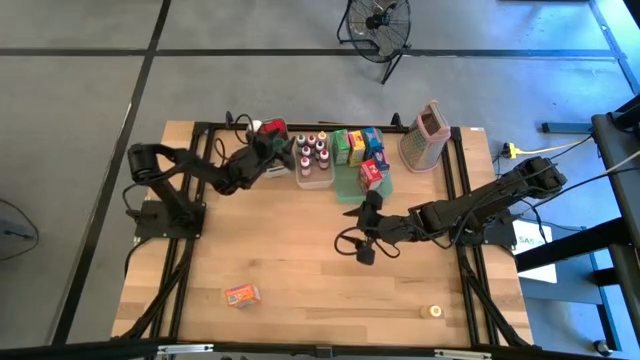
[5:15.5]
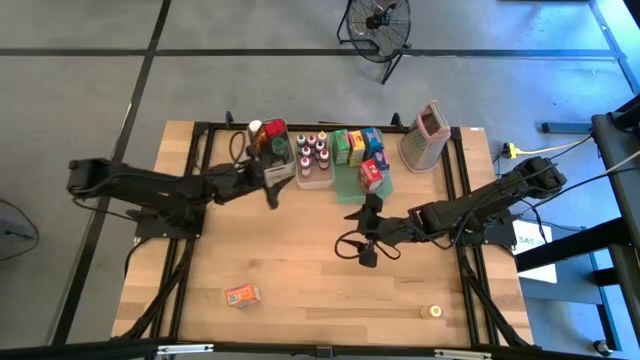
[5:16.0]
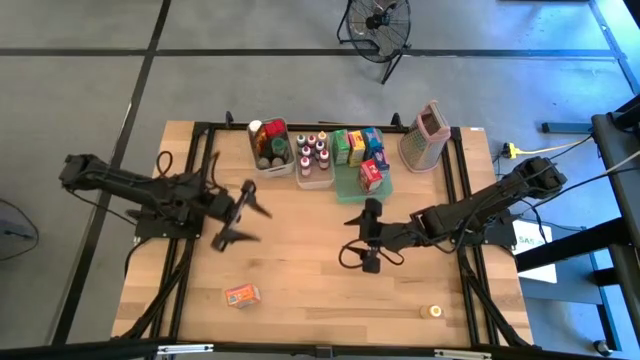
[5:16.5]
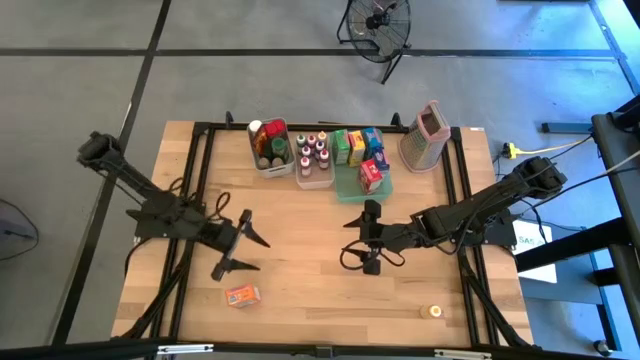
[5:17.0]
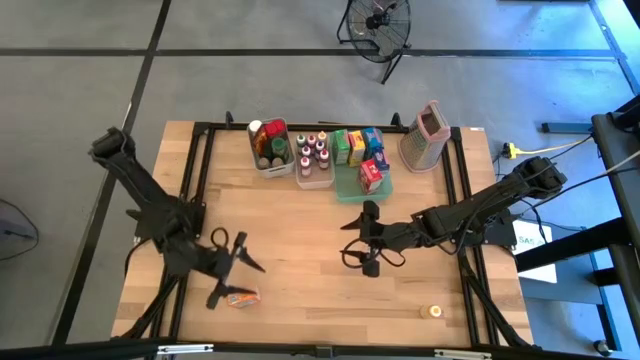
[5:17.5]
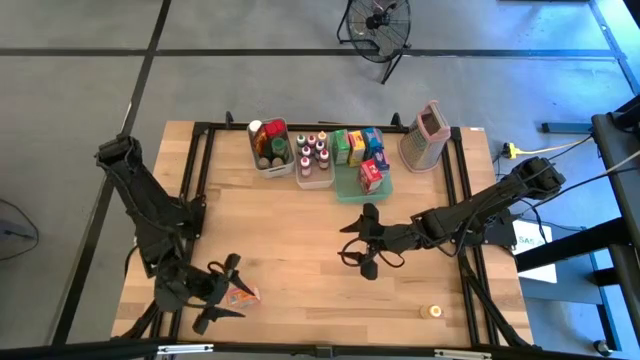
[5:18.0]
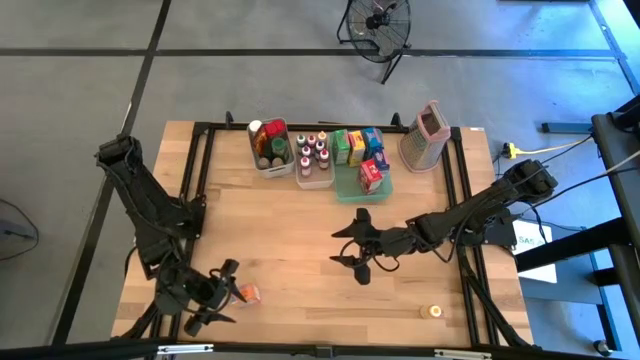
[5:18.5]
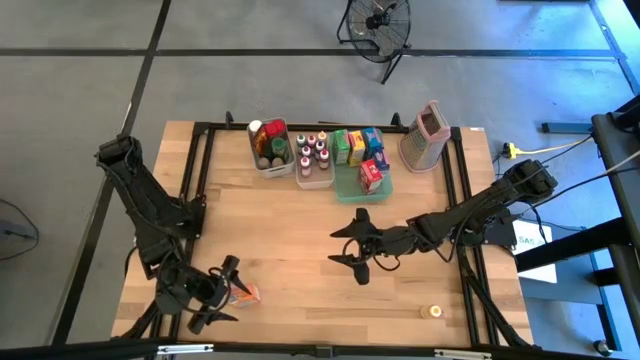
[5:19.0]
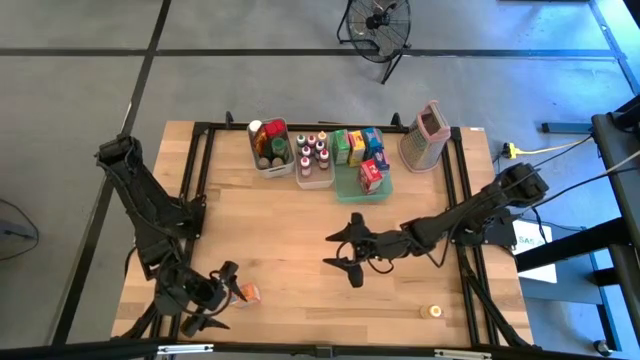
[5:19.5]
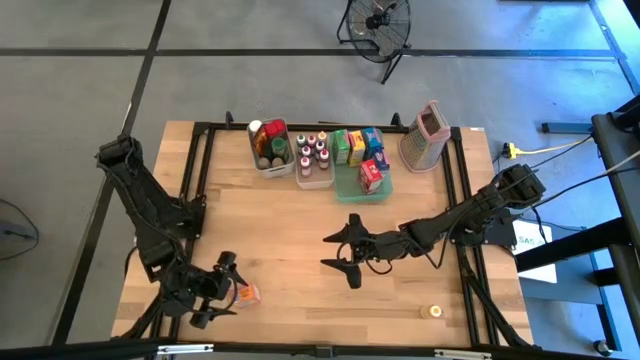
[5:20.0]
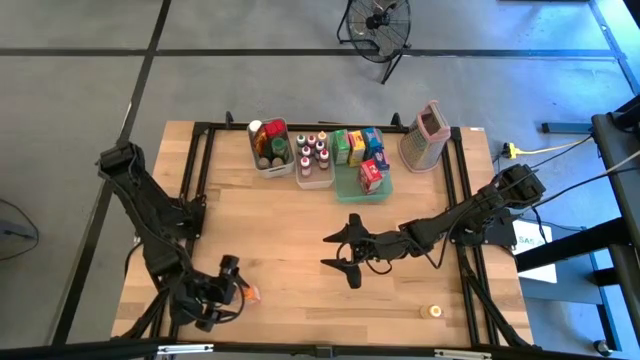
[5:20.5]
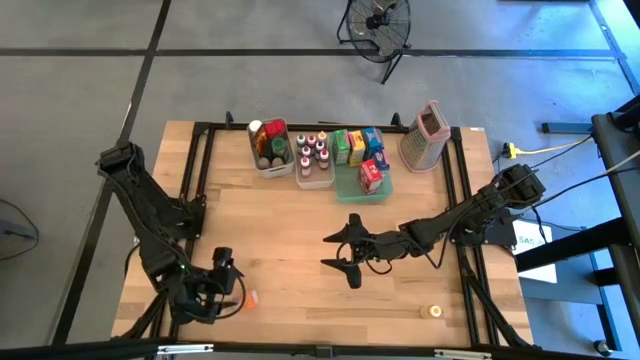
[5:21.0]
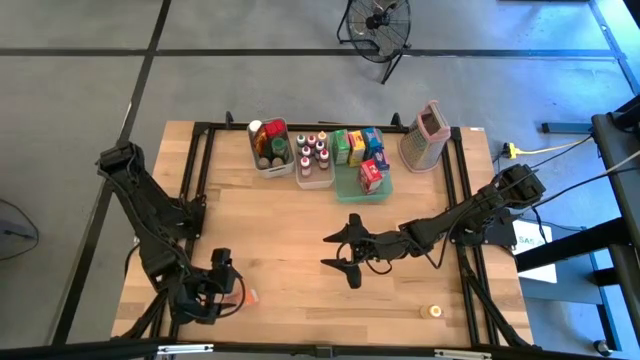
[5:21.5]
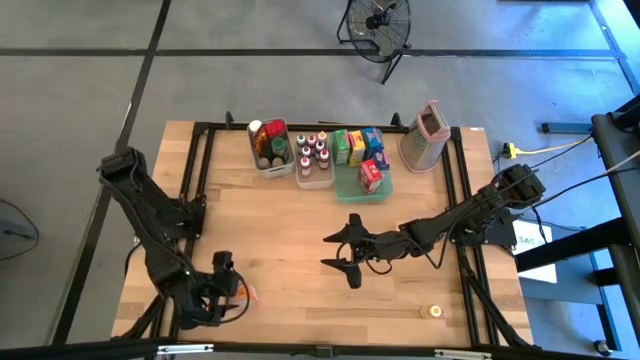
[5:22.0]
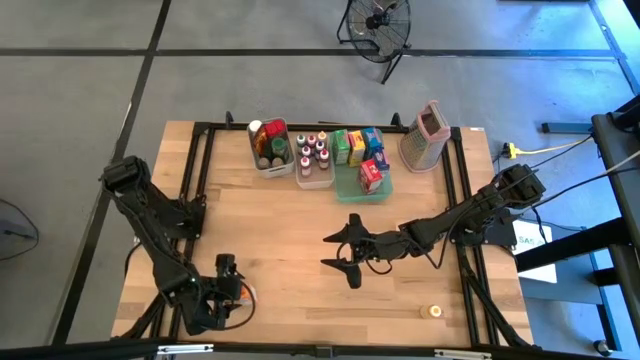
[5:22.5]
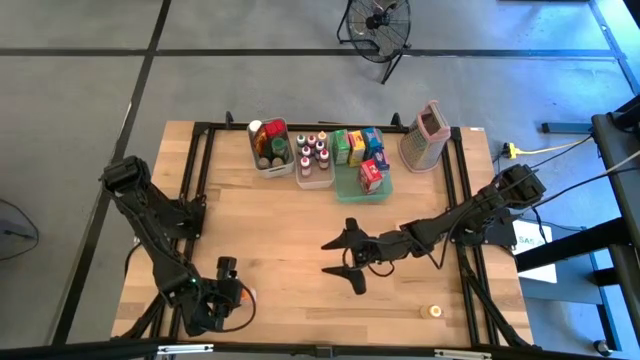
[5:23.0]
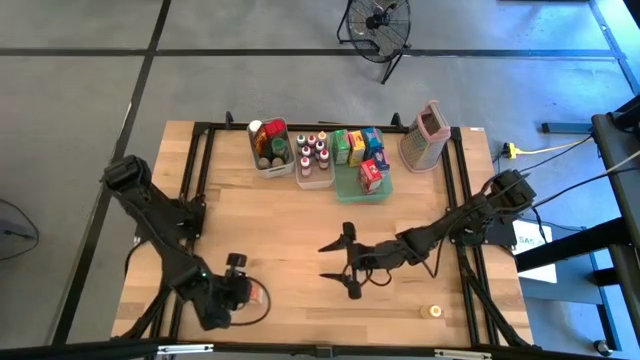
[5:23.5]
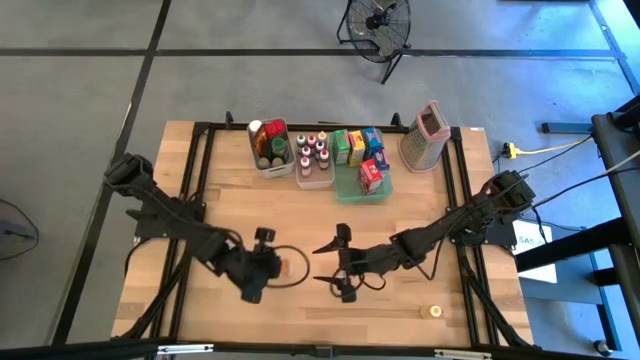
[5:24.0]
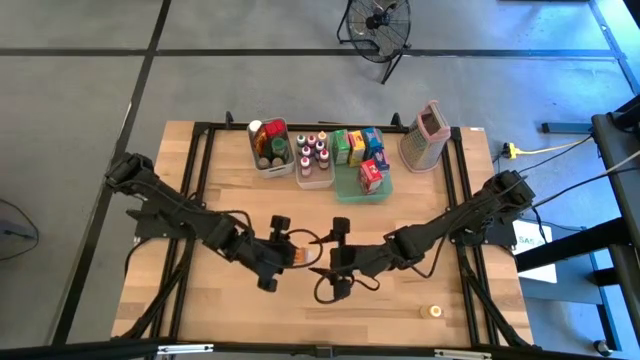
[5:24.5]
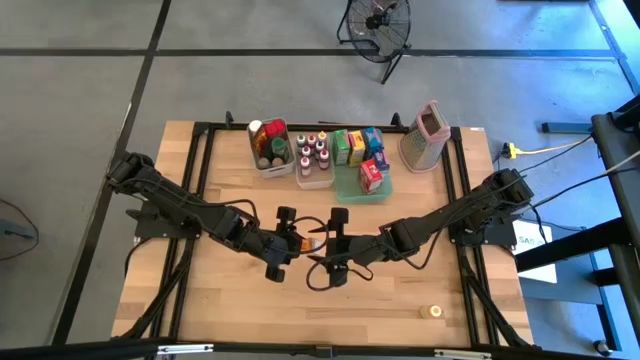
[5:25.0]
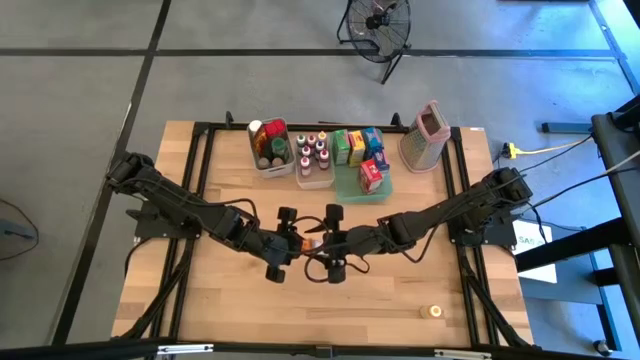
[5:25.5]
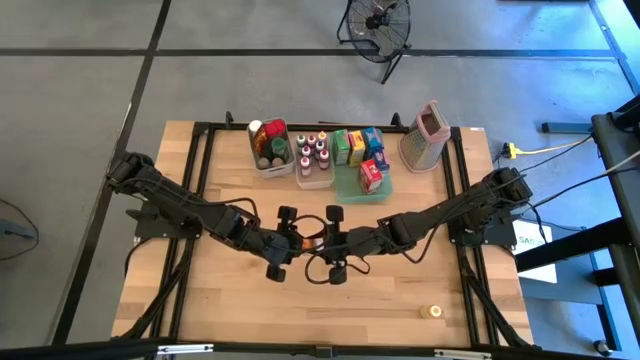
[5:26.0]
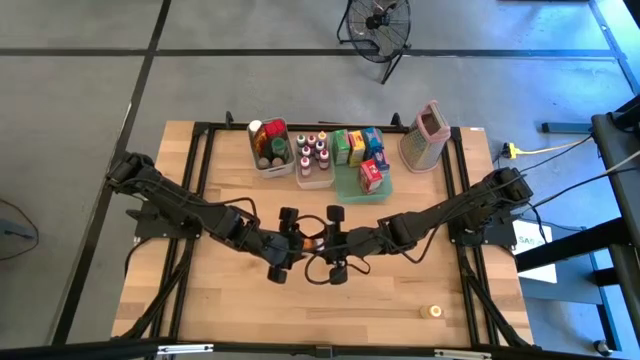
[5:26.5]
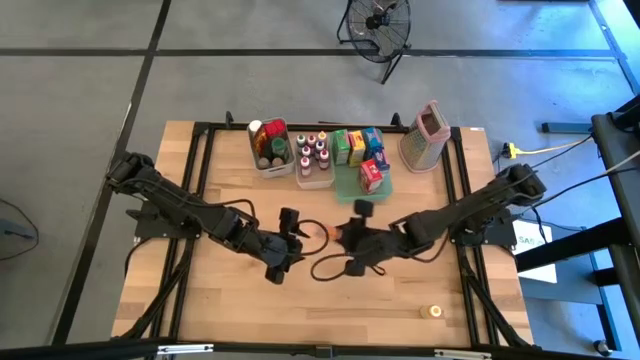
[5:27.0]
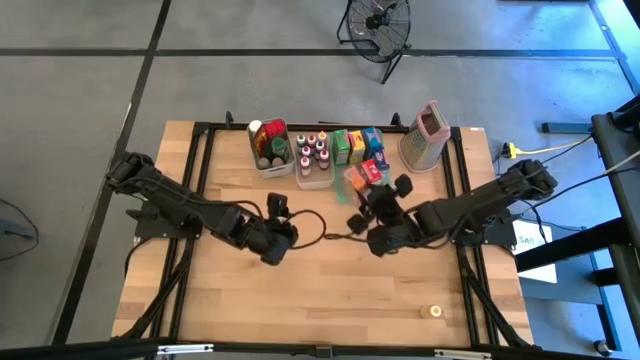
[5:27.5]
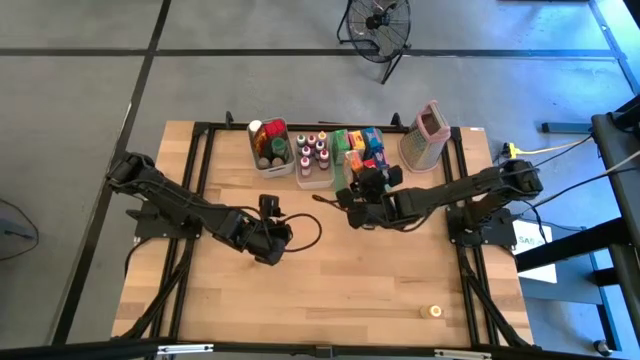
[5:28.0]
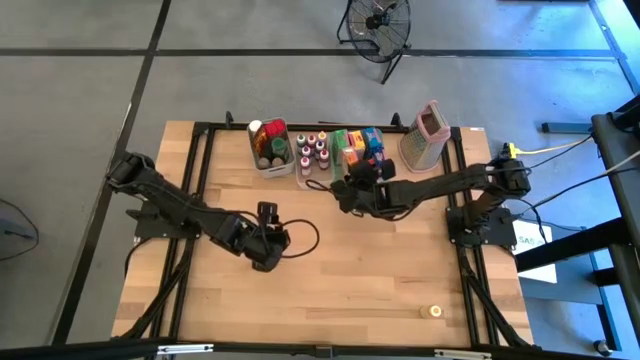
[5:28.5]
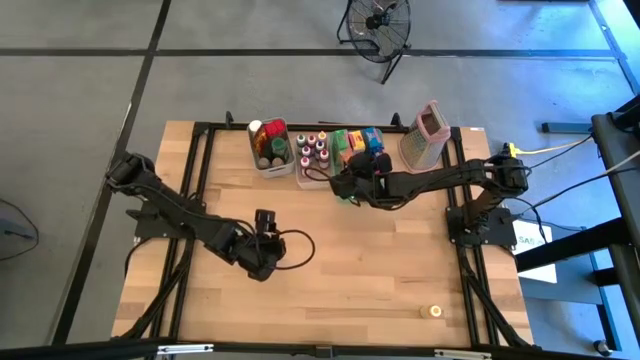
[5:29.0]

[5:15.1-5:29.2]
Task: Pick & Place Kitchen Items
Put the orange cereal box into the green bin

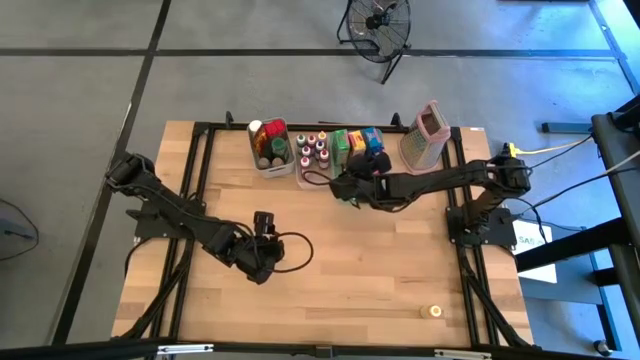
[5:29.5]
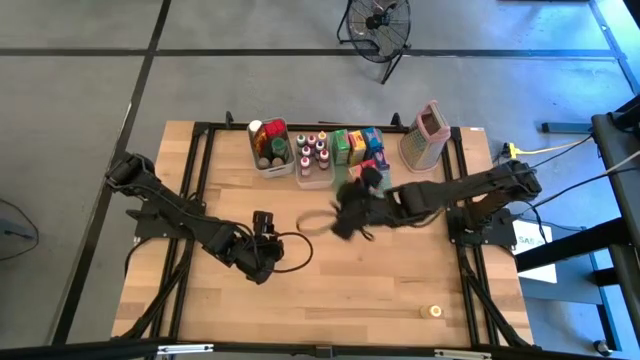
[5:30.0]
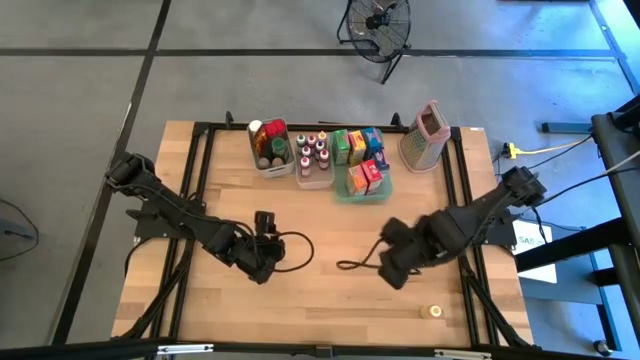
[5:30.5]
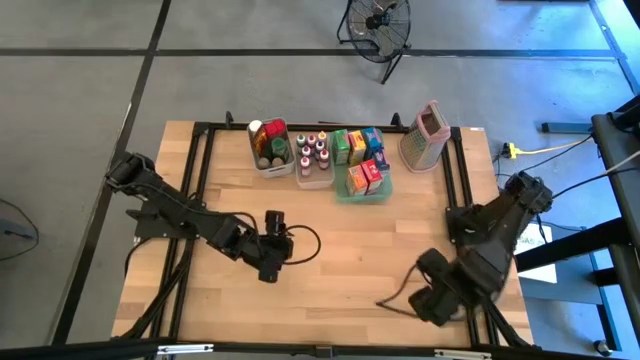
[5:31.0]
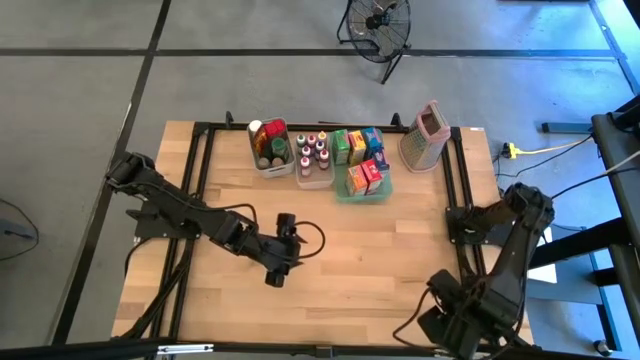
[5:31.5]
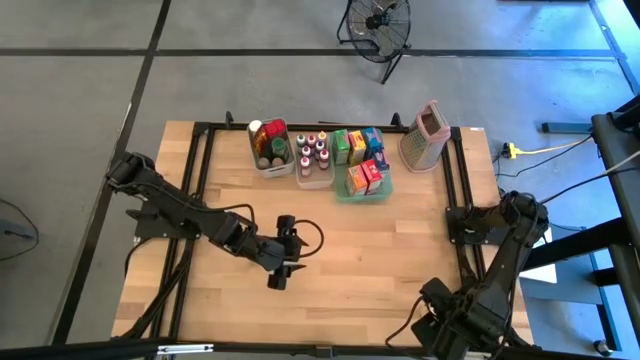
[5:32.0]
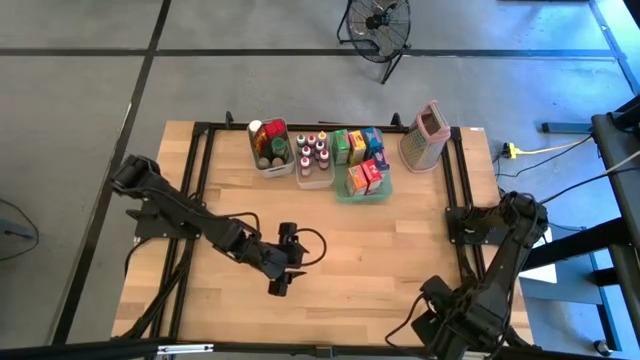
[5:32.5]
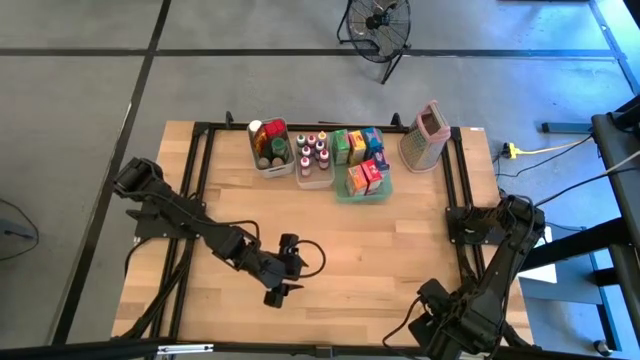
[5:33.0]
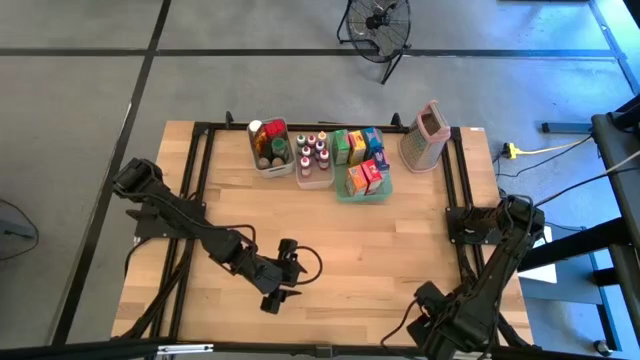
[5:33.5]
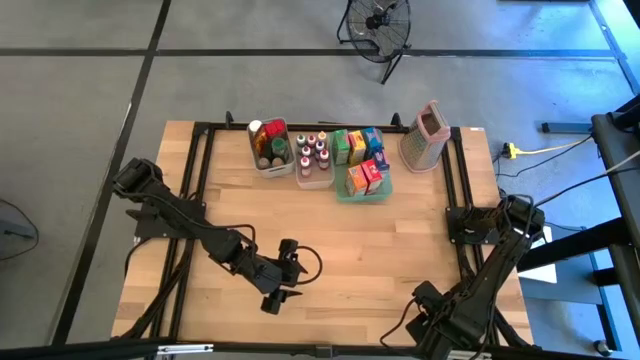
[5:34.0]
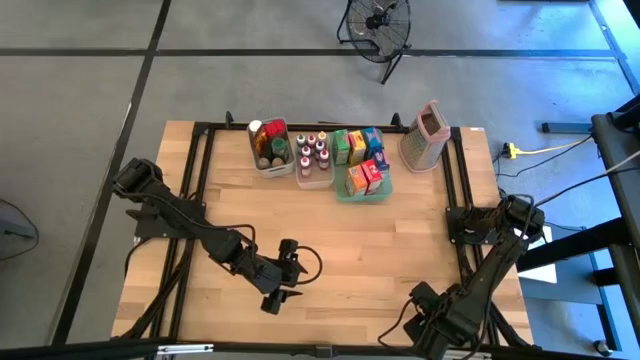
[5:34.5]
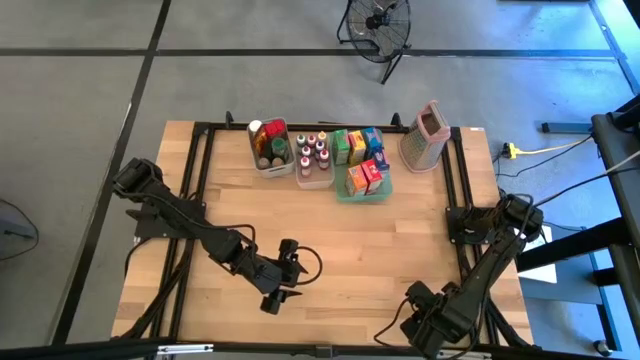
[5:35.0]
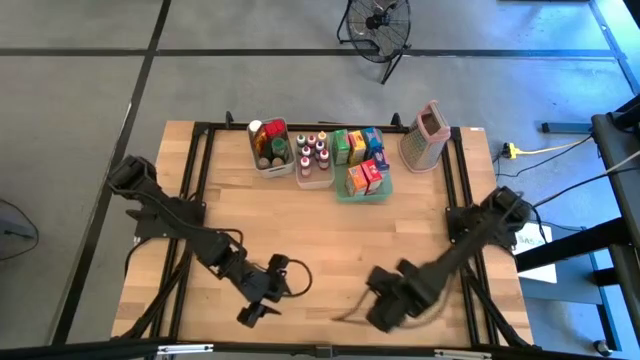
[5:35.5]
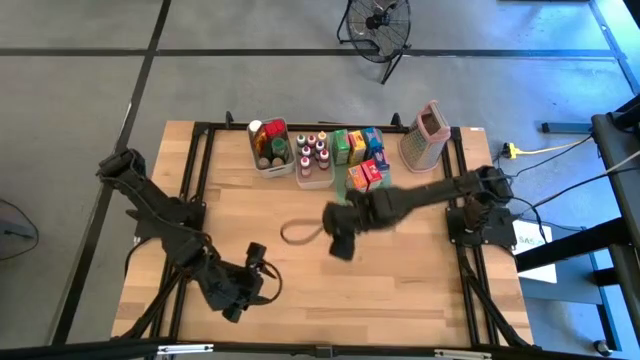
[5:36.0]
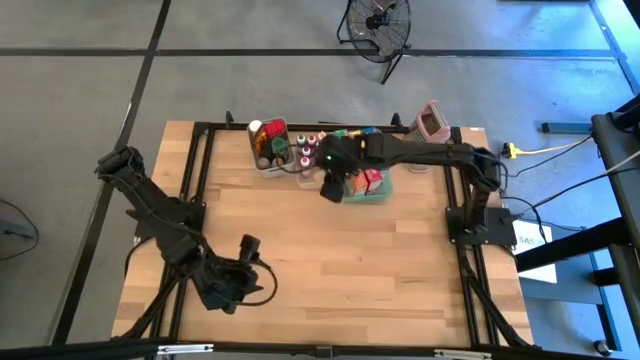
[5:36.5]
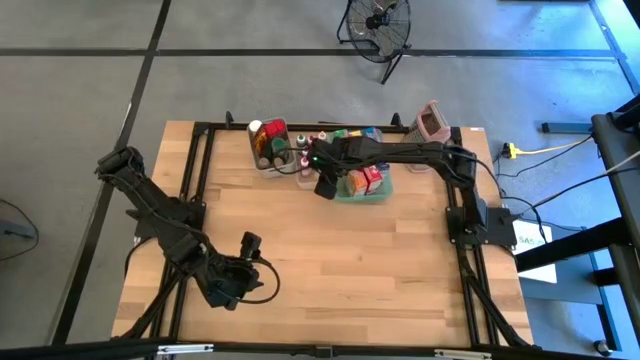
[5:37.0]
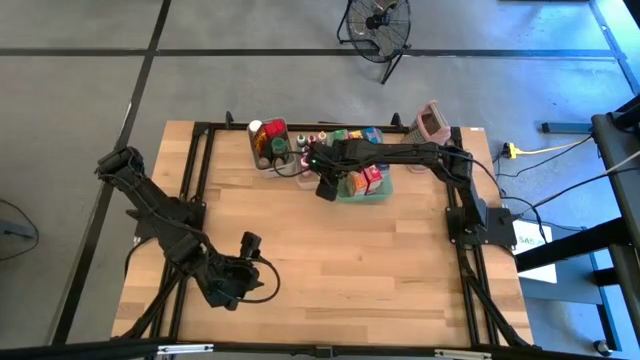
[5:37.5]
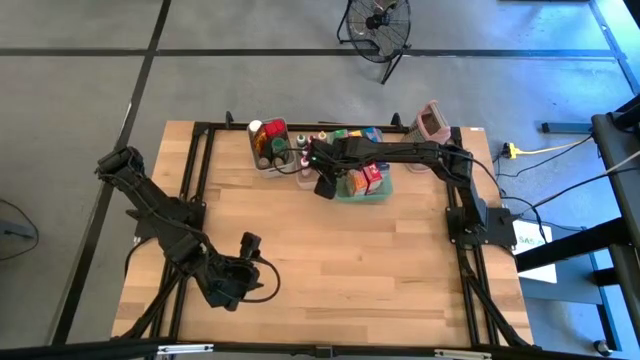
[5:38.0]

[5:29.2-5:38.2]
Put the yellow food coloring bottle into the transparent bin
